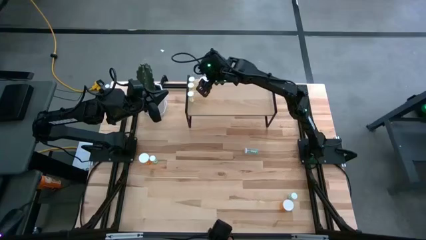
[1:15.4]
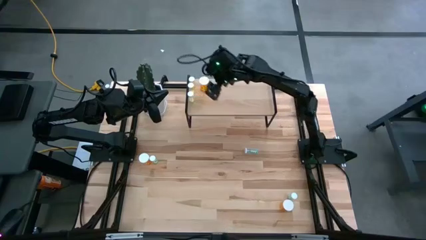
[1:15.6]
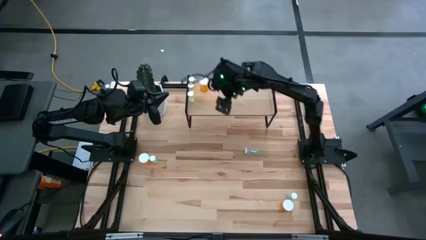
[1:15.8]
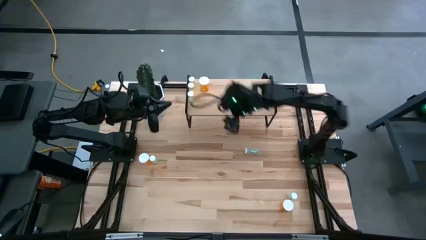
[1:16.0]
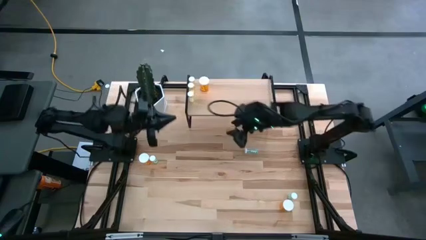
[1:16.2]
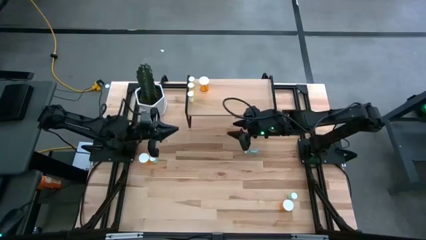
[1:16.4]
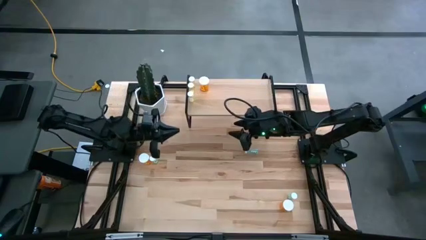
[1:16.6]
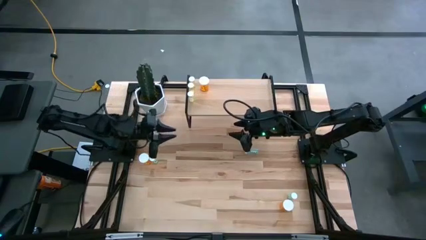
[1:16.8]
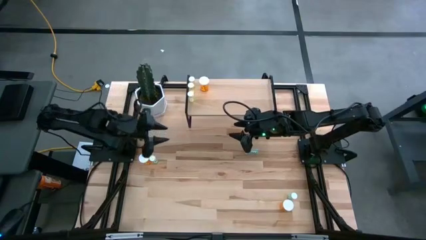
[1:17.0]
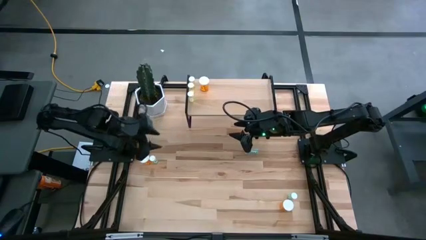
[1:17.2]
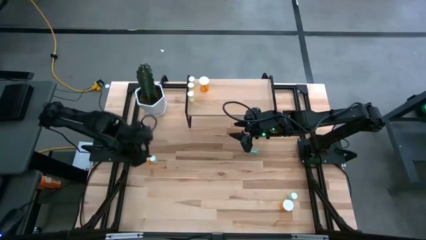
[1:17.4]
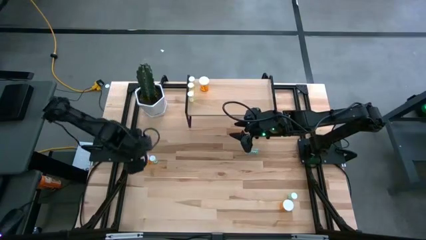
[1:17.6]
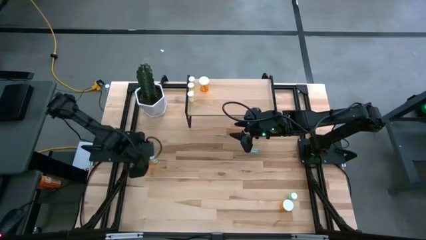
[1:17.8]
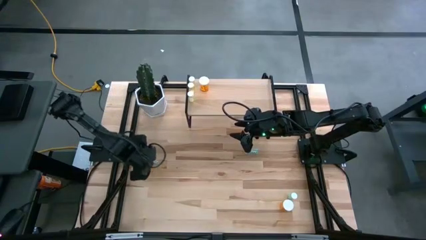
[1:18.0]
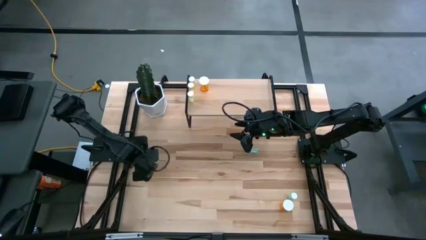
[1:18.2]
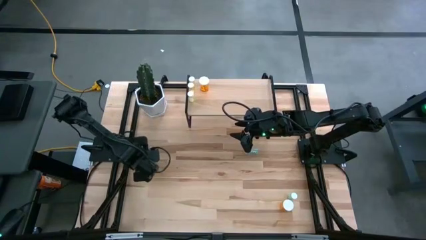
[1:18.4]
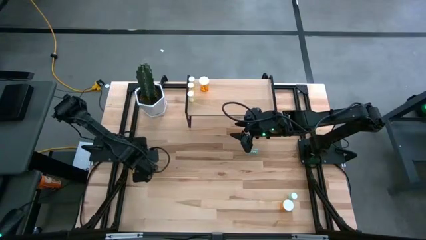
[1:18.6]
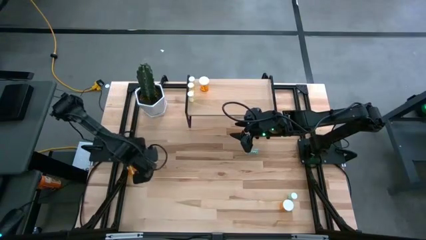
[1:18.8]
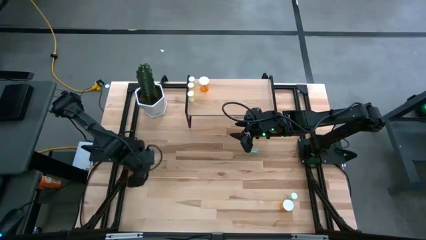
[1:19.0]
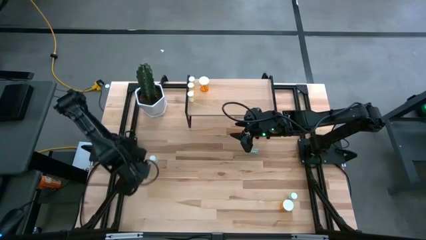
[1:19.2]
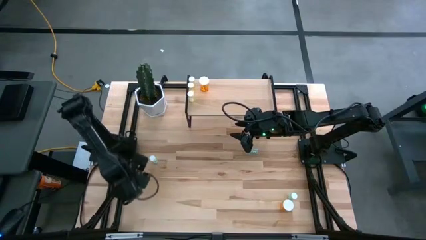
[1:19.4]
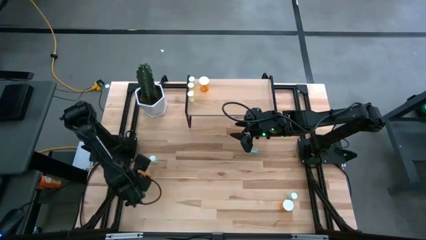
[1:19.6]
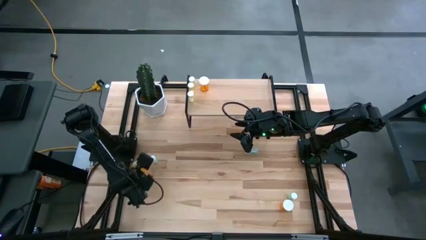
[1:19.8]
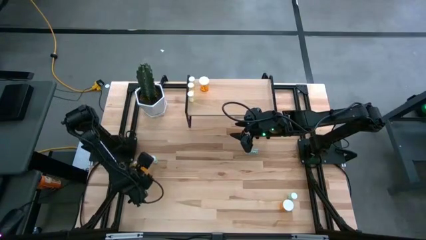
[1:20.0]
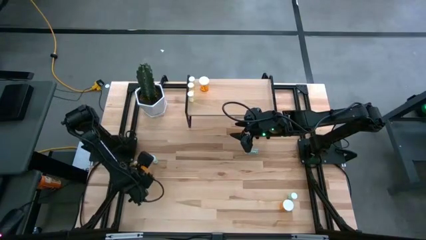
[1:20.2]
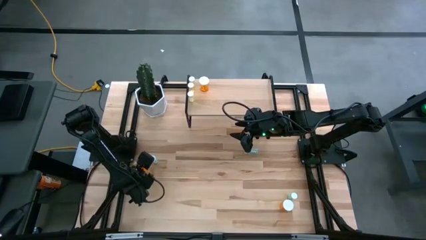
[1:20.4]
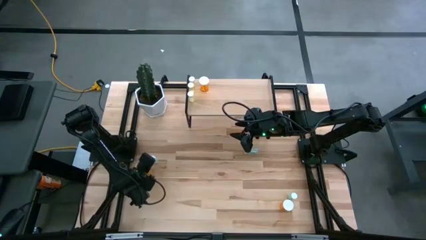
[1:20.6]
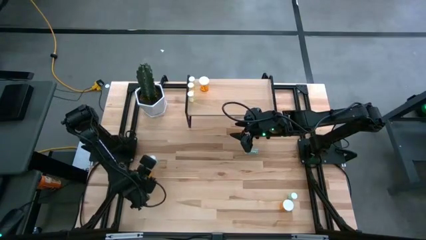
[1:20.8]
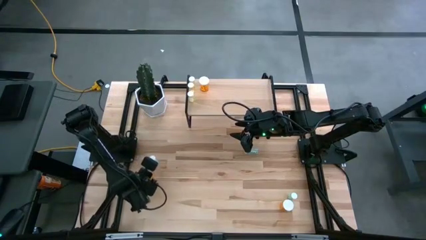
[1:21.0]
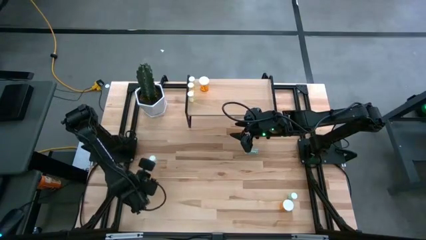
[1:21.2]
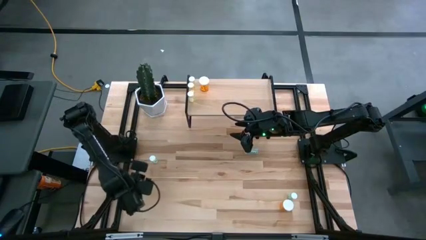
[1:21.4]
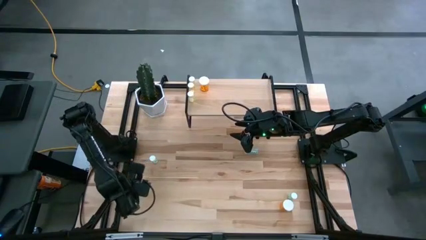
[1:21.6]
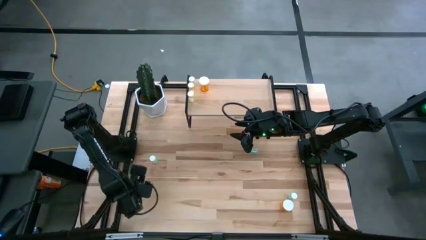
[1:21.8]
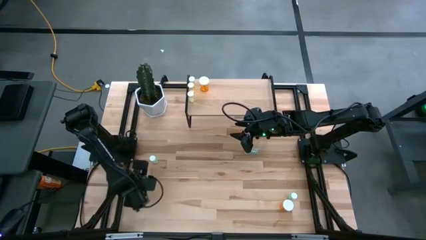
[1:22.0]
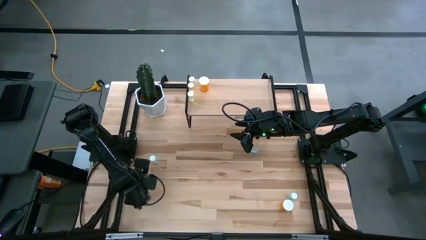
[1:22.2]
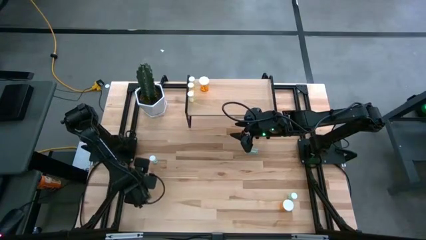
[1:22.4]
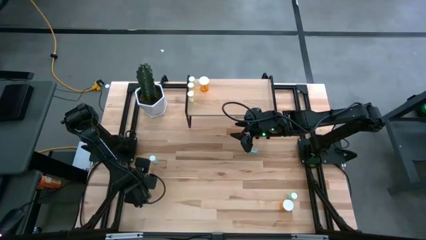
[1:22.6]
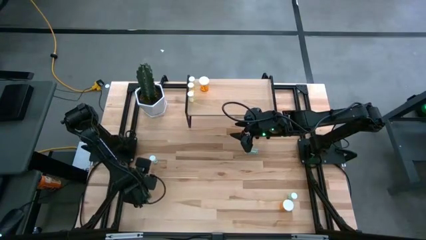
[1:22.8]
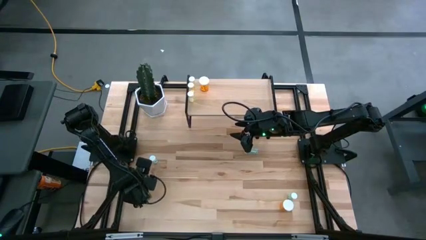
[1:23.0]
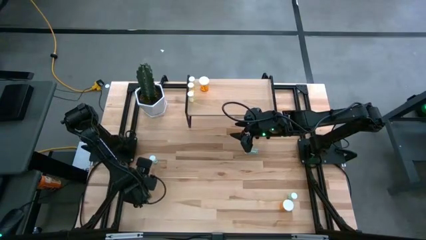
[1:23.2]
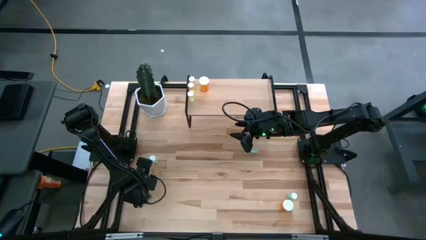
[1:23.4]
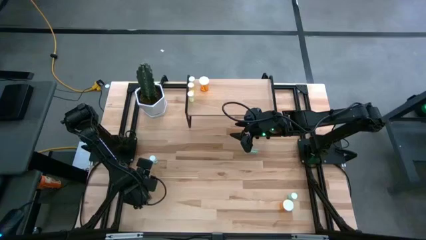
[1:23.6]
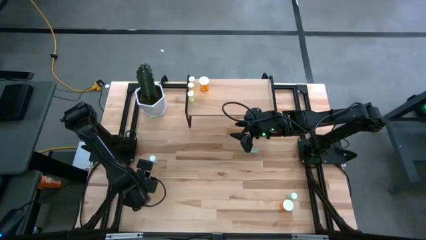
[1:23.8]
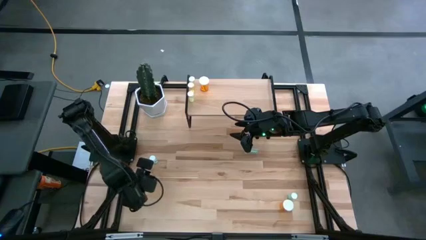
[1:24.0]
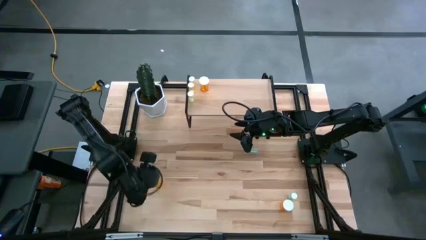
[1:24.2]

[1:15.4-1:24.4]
Task: Pick and place medicine bottles onto shelf by color
Align the left orange pill bottle with the other yellow pill bottle on the shelf

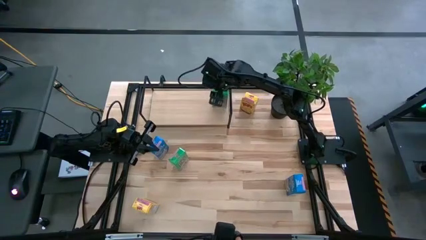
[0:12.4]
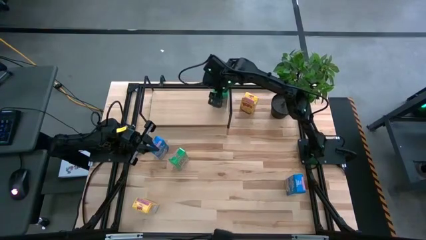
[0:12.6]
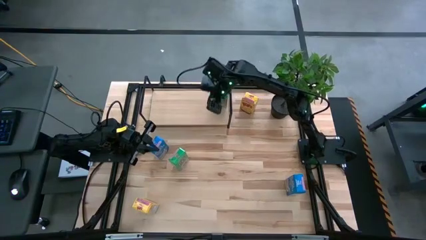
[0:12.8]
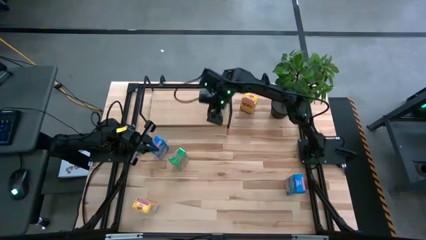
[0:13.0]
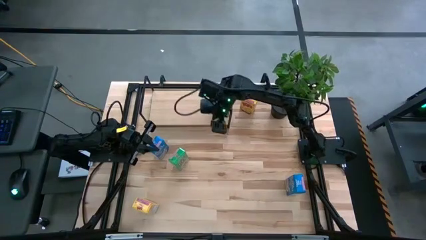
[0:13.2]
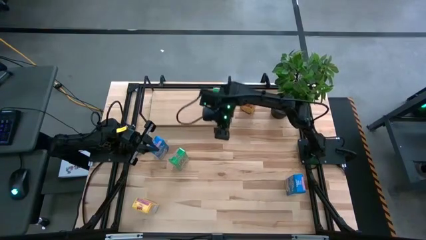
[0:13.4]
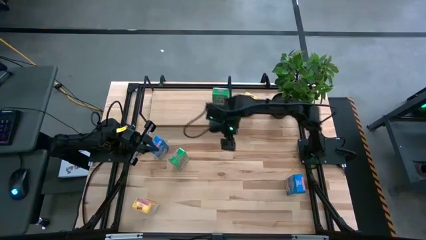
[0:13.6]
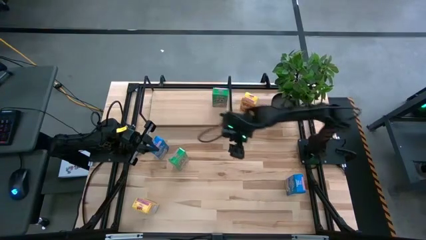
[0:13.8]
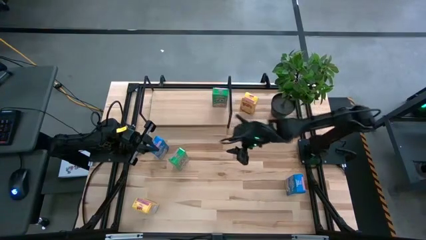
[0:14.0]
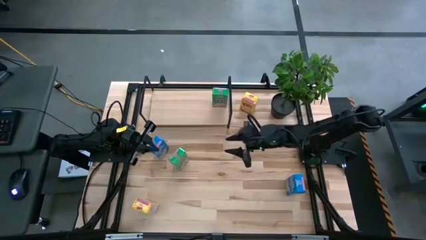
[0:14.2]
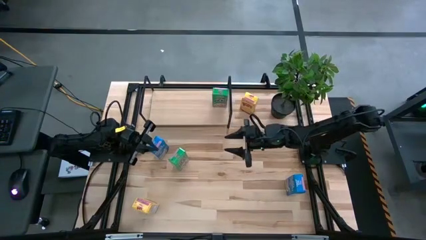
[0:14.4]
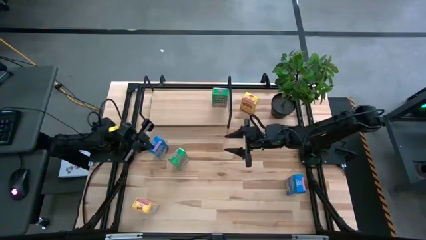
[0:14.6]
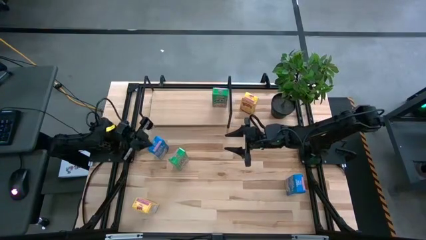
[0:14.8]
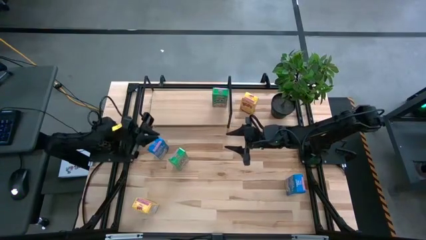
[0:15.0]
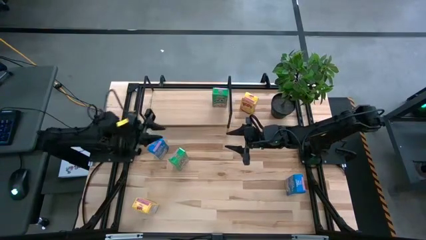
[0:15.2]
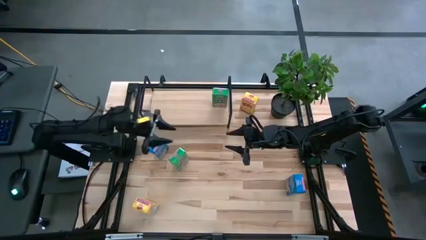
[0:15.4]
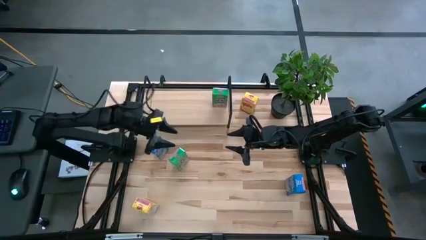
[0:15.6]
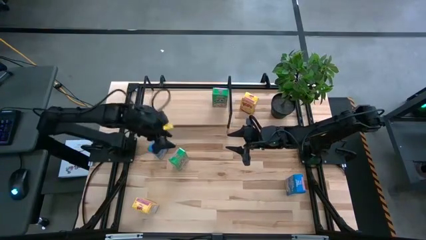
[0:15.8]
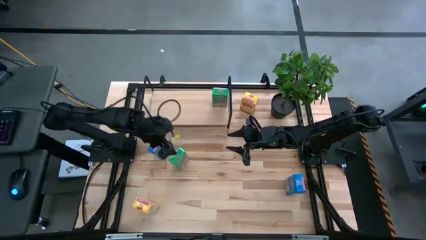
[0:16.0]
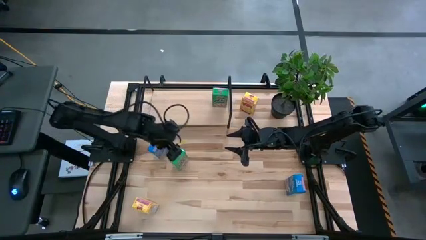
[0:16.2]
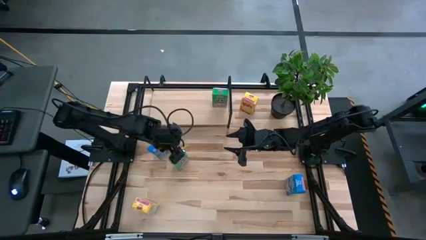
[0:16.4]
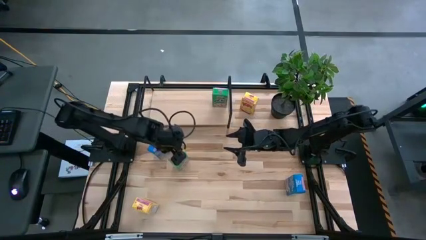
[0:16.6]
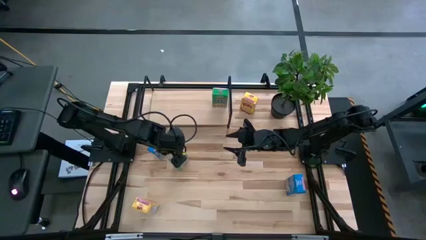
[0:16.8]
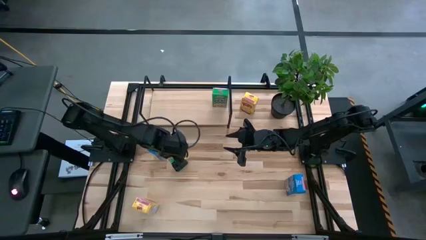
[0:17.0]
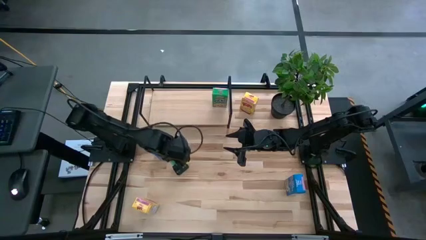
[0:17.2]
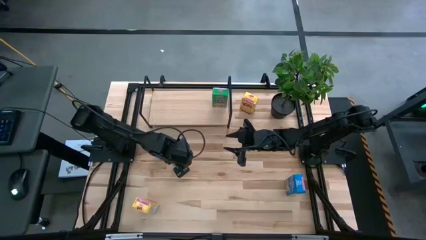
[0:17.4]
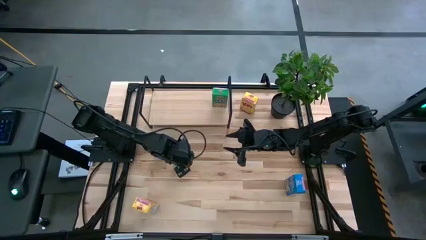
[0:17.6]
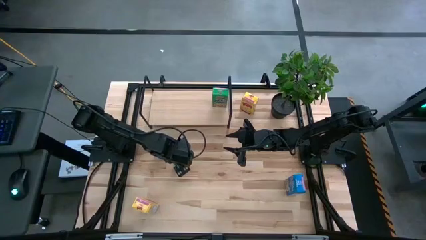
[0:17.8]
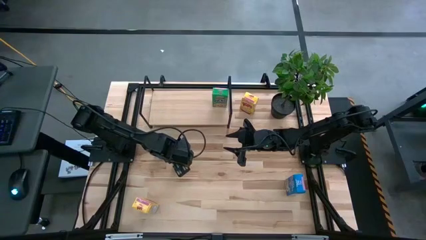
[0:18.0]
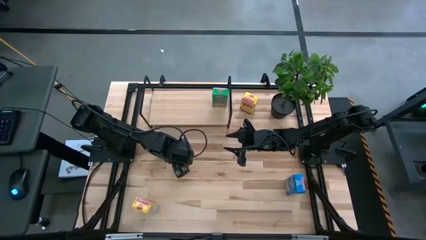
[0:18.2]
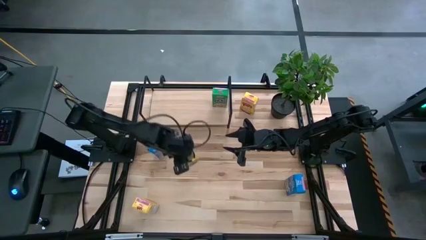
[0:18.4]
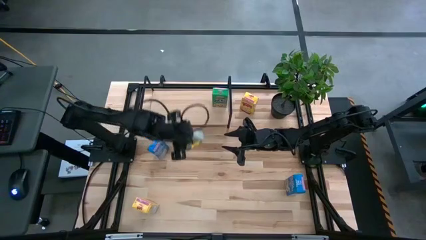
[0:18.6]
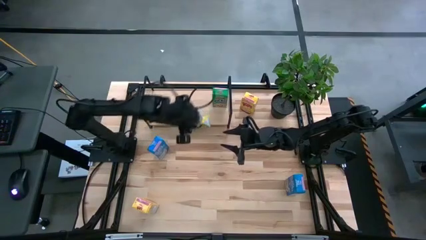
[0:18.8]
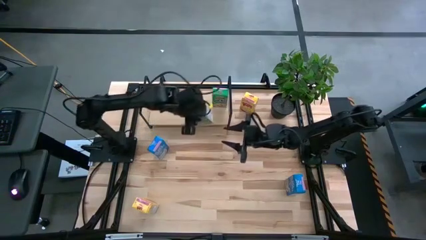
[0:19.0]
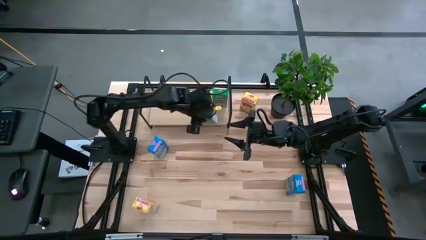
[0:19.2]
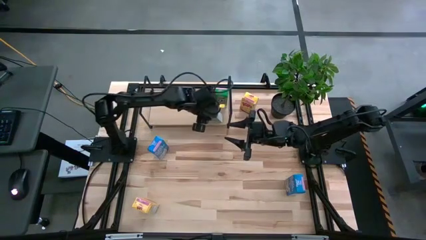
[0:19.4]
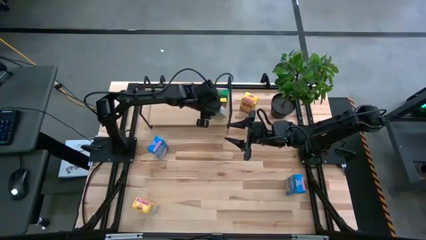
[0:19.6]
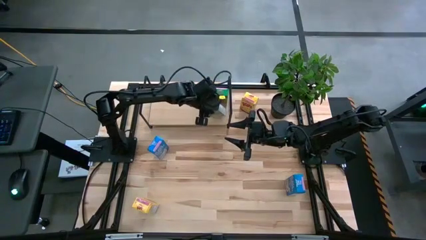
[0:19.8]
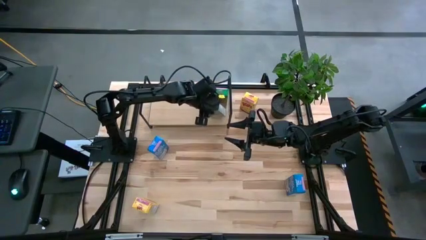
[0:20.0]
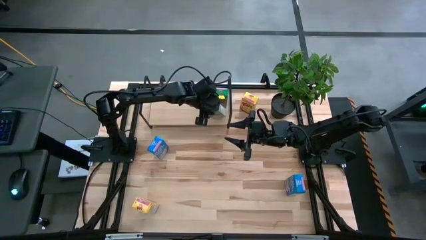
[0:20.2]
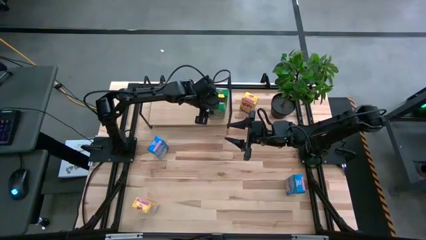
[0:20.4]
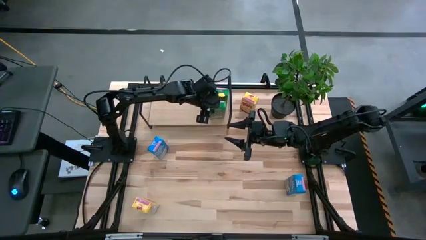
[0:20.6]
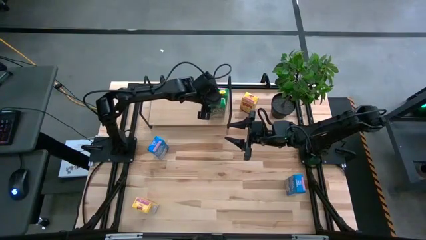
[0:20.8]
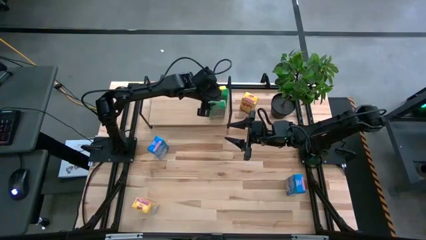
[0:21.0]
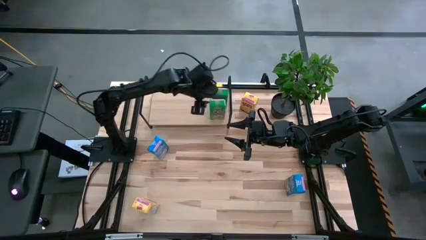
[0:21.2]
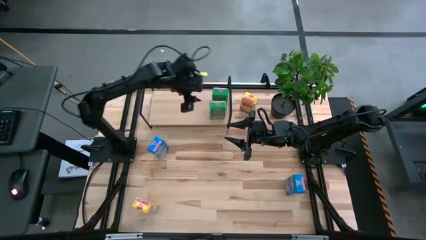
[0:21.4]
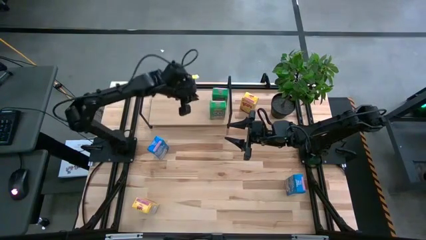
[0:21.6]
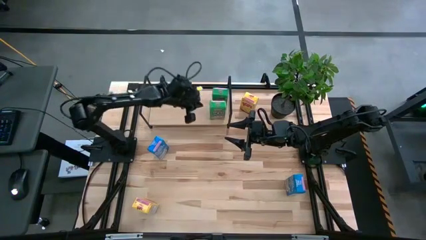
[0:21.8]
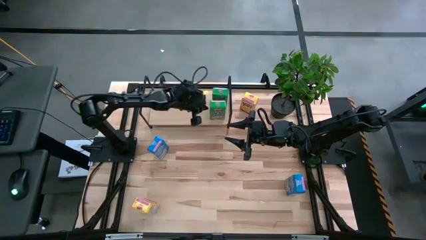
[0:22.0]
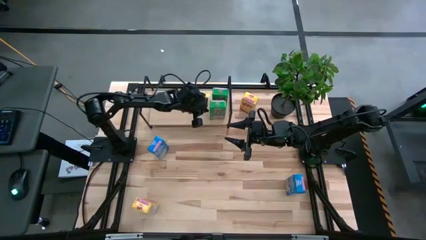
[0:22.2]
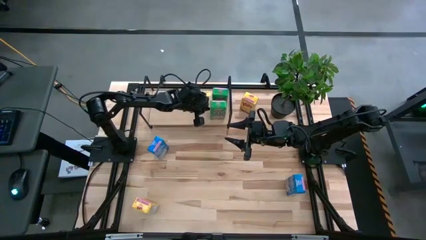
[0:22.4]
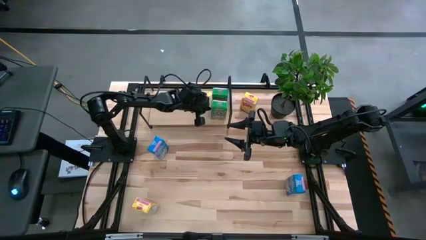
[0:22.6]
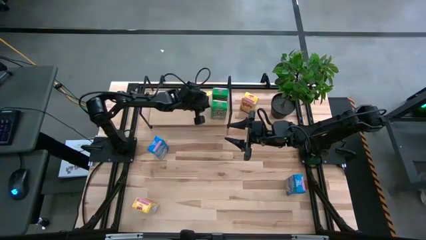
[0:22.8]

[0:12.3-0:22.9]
Task: Stack cereal on shelf
Put the green cereal box aligned with the other green cereal box on the shelf
